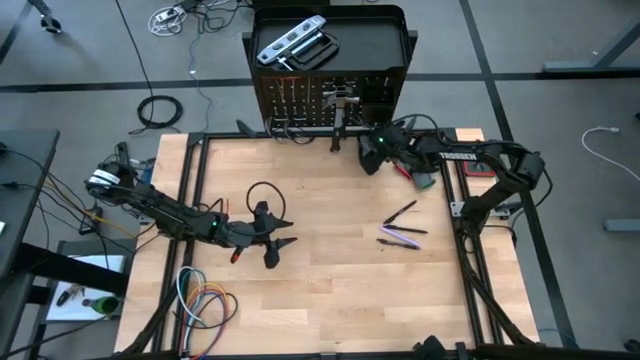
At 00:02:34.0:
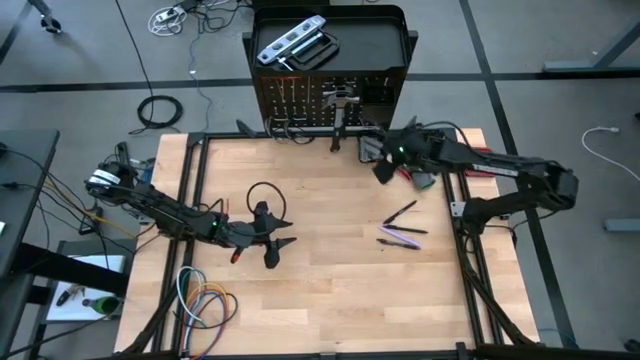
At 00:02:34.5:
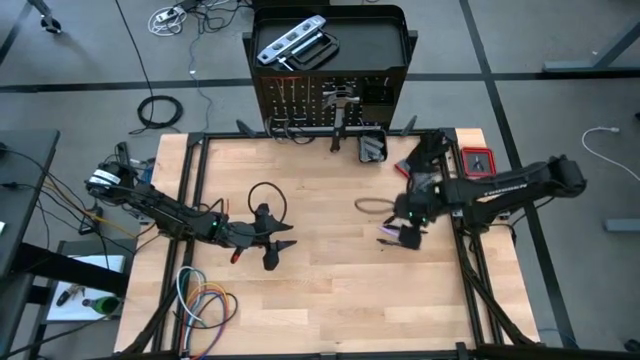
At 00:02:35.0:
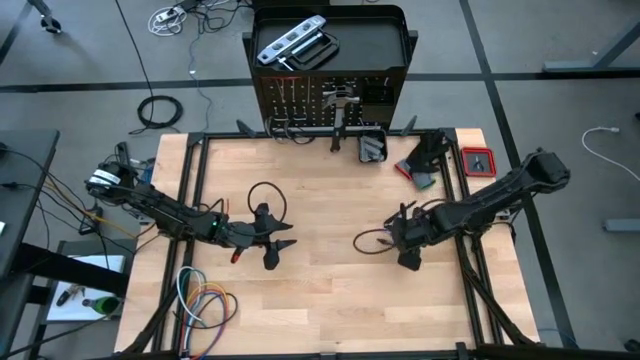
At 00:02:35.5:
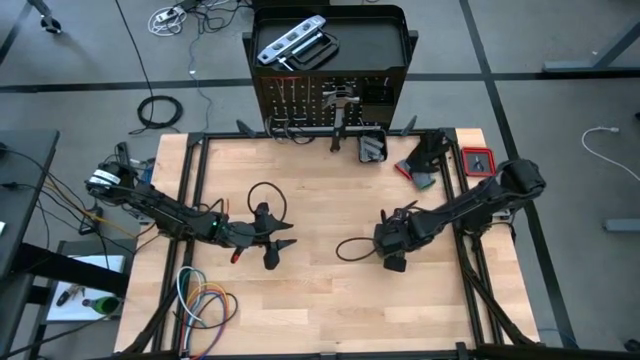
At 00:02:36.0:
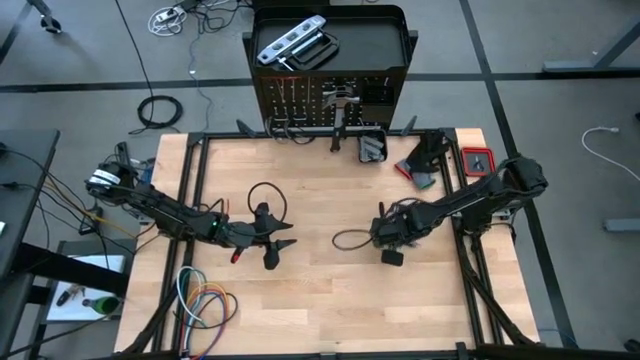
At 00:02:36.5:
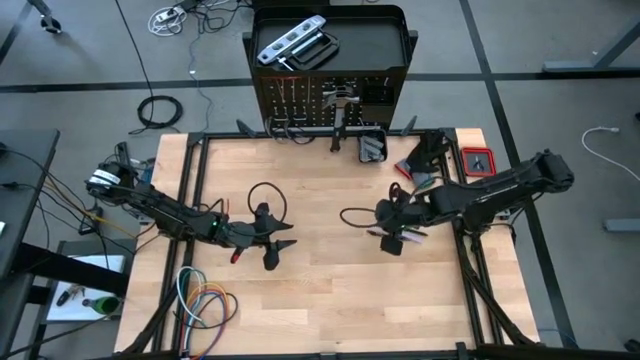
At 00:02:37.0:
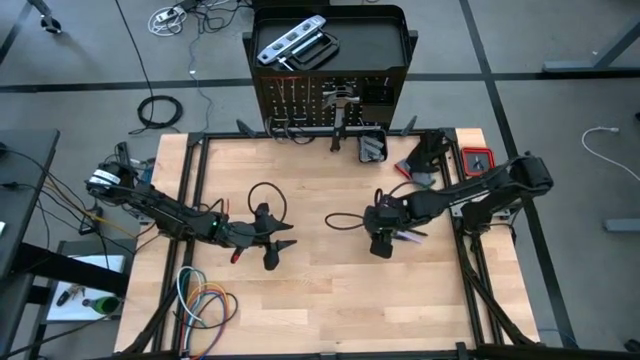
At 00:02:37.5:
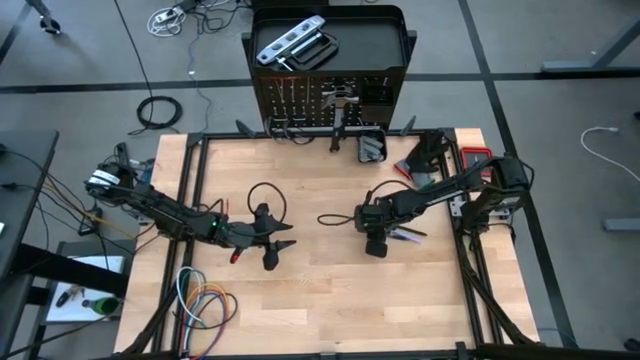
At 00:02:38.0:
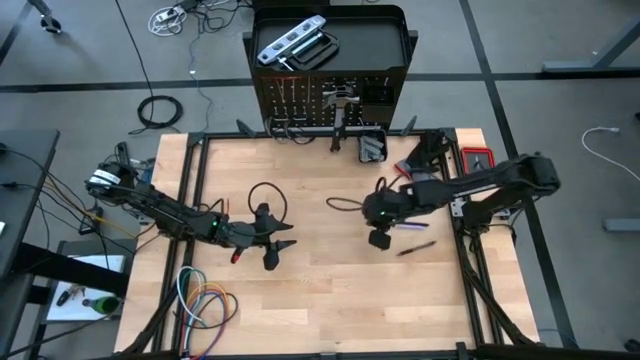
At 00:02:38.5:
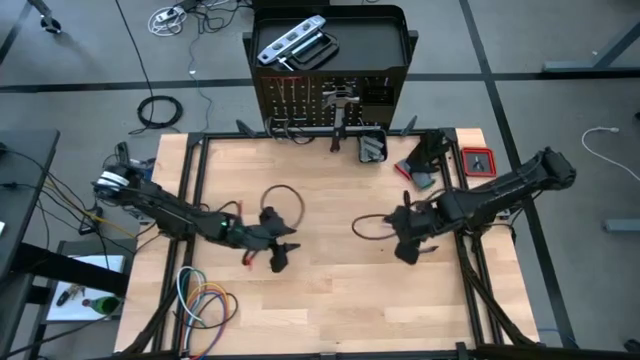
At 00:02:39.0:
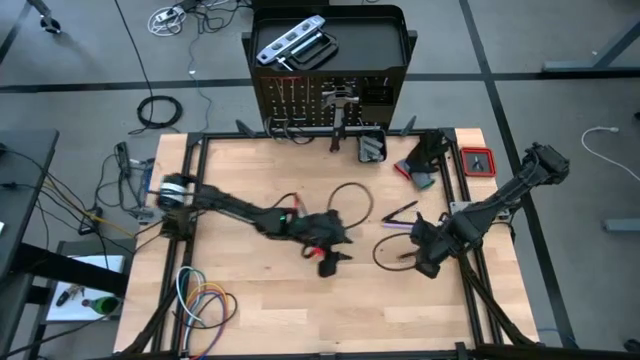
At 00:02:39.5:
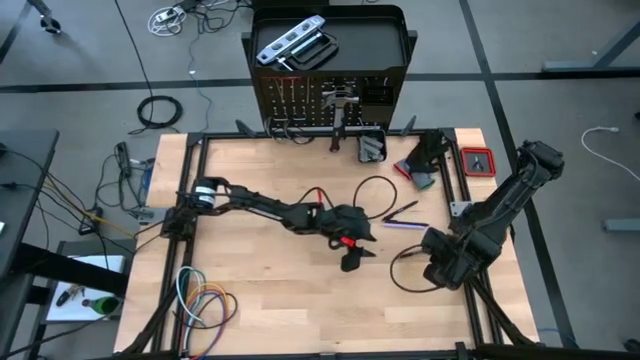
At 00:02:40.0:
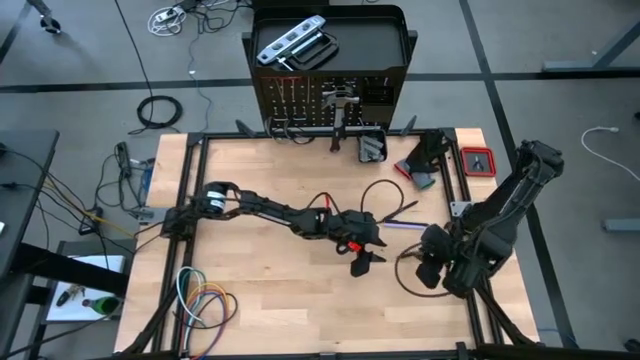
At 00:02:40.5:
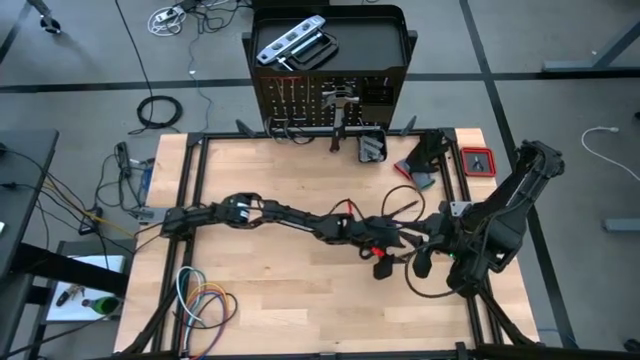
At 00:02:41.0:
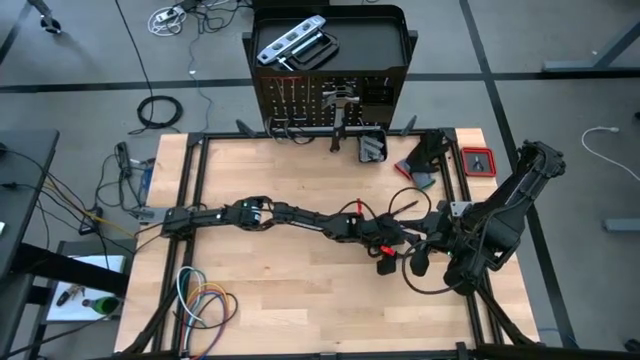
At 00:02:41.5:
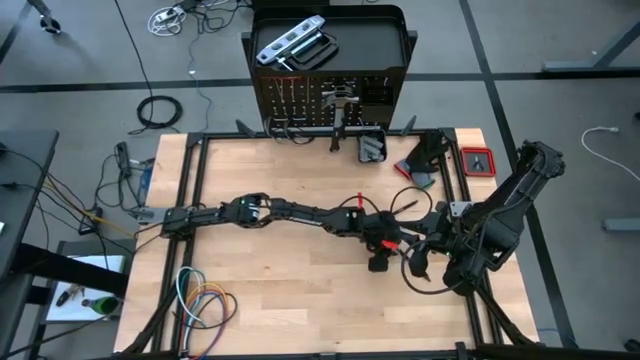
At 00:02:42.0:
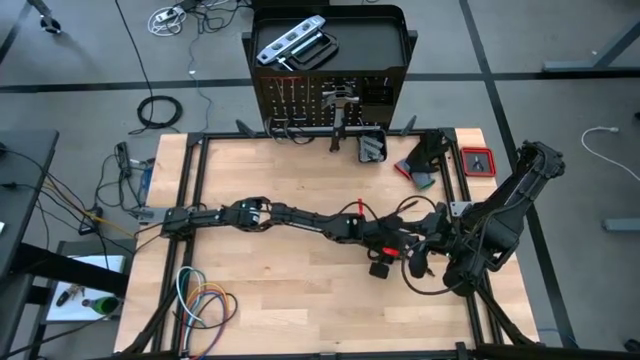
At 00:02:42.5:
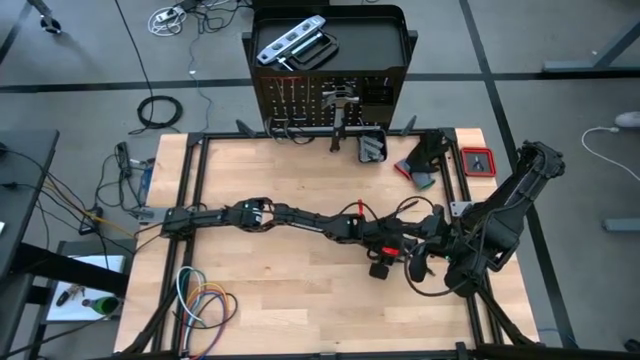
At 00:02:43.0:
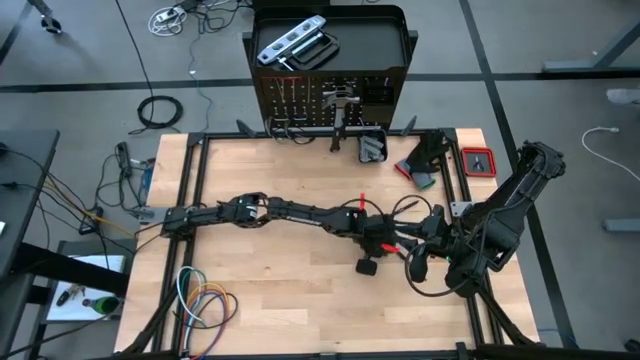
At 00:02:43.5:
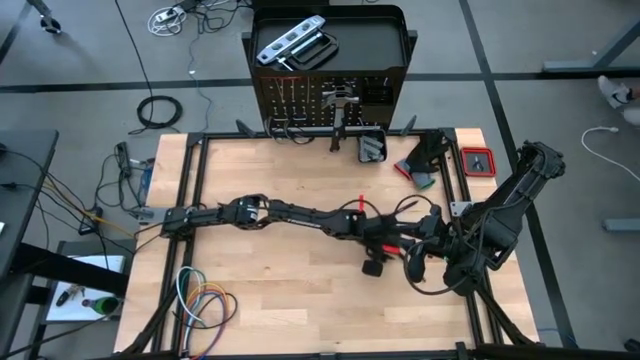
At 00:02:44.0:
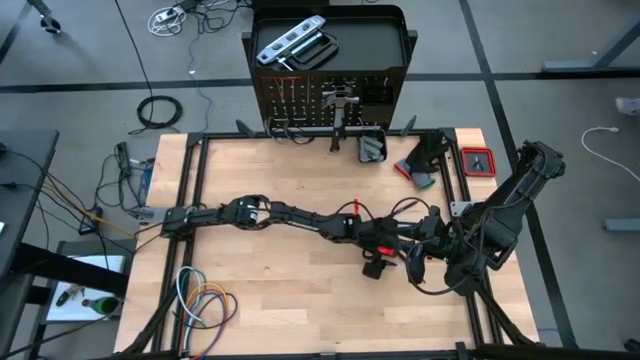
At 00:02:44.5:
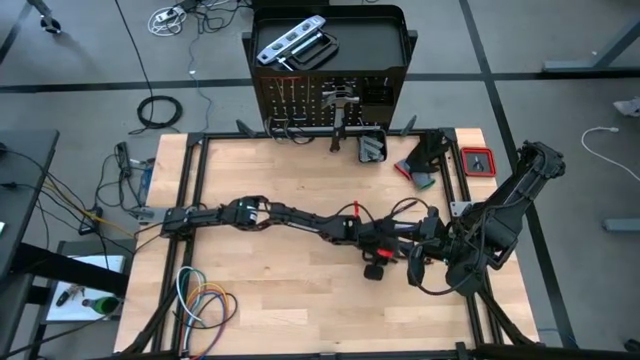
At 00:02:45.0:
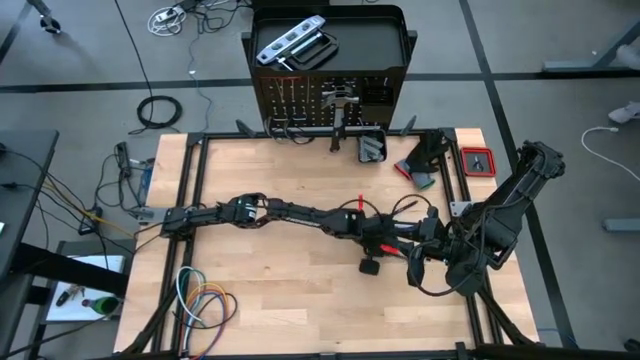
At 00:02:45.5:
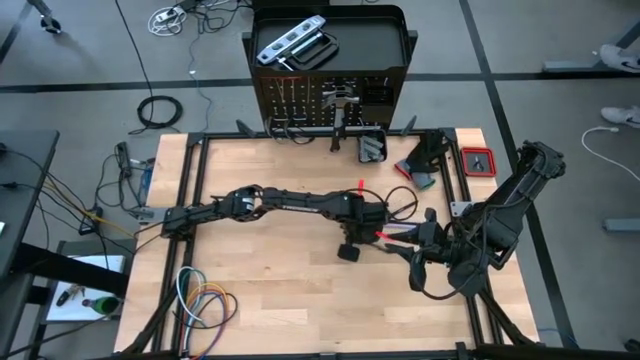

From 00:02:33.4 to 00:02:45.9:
Task: Hang tools onto peg board
Put the black pen into the top basket of the peg board

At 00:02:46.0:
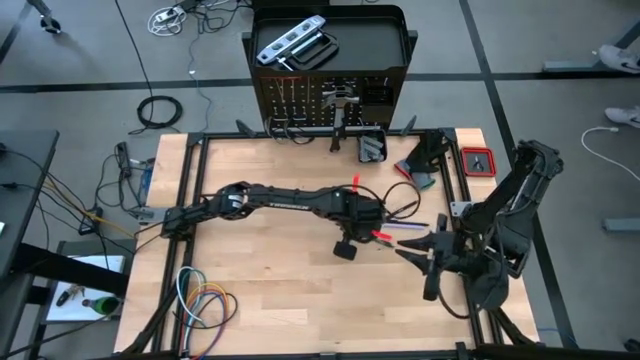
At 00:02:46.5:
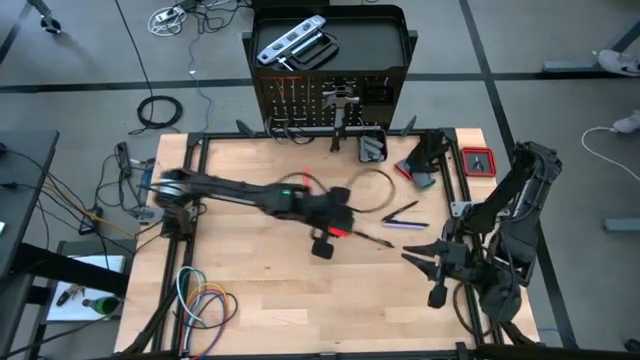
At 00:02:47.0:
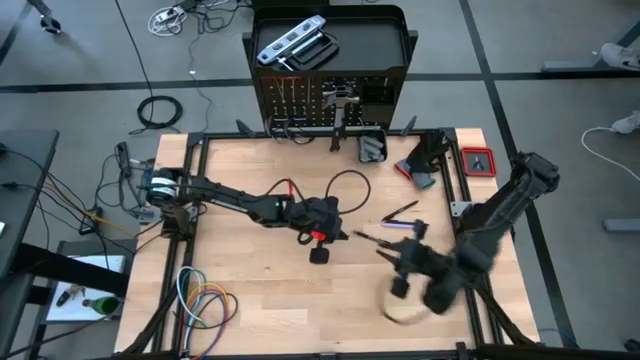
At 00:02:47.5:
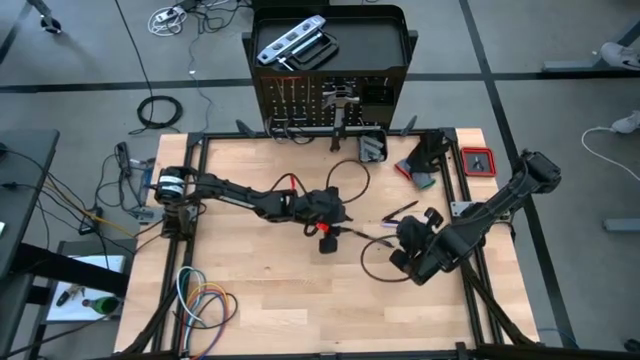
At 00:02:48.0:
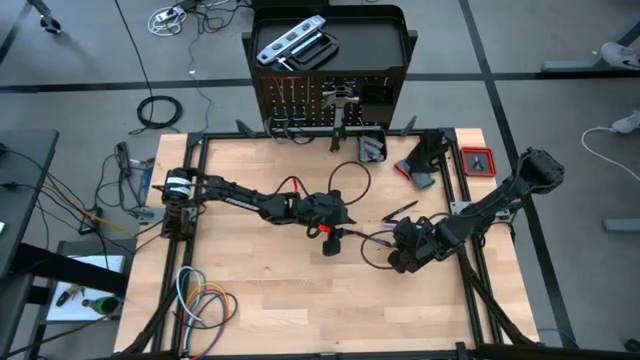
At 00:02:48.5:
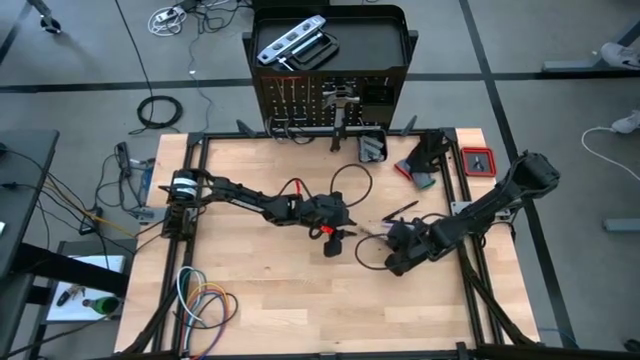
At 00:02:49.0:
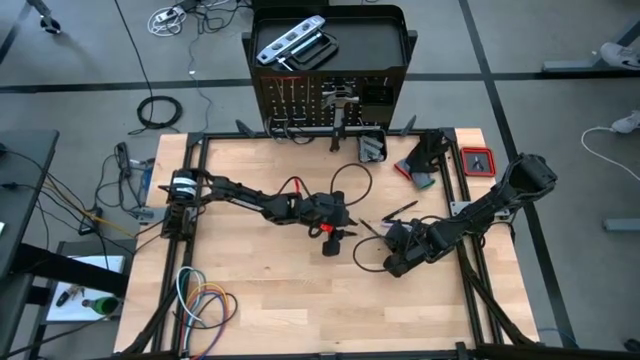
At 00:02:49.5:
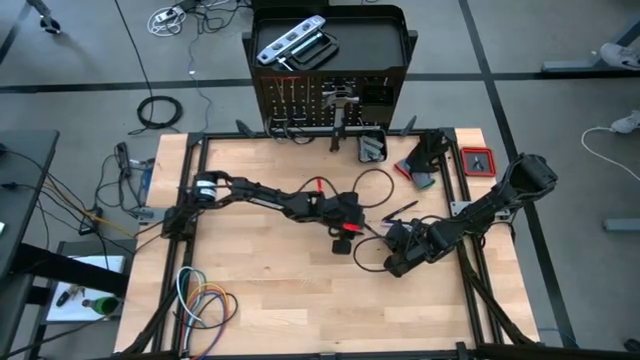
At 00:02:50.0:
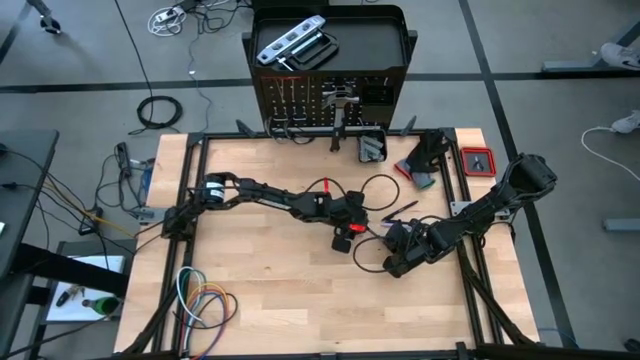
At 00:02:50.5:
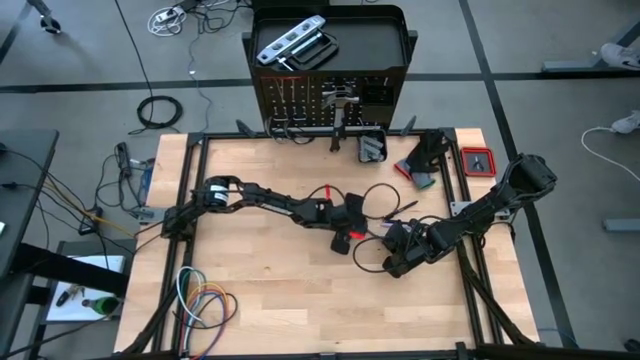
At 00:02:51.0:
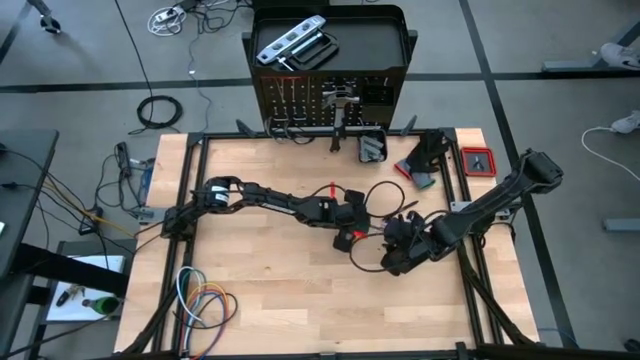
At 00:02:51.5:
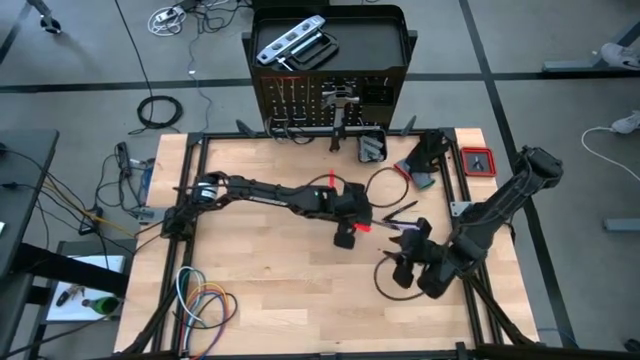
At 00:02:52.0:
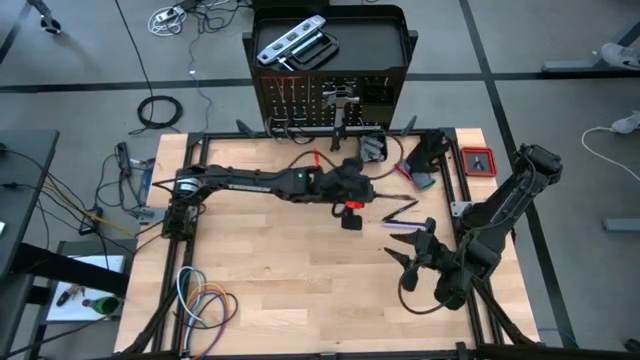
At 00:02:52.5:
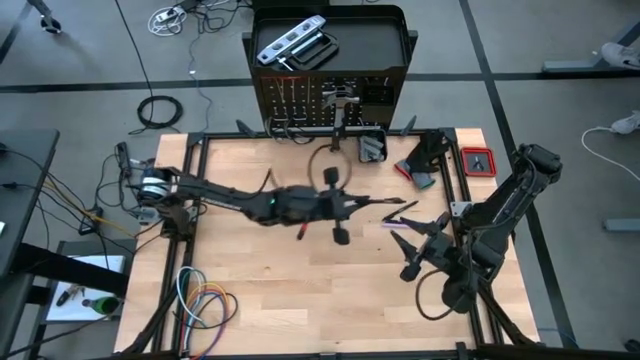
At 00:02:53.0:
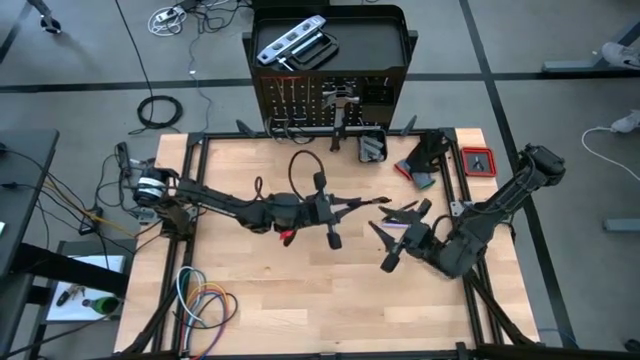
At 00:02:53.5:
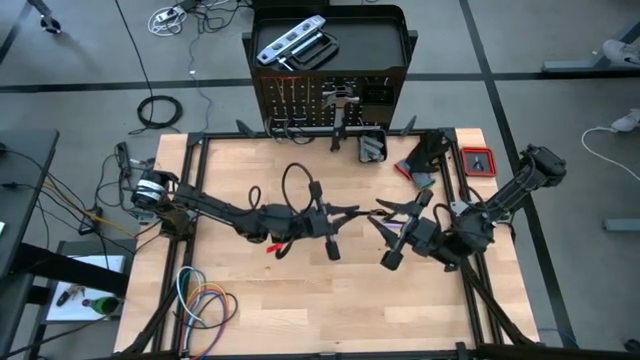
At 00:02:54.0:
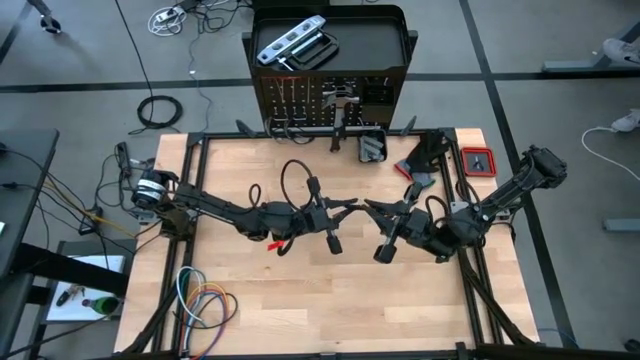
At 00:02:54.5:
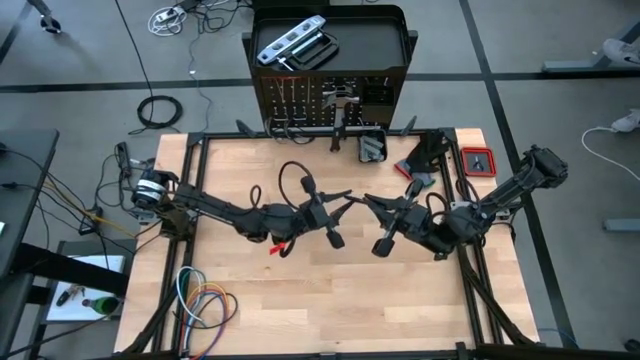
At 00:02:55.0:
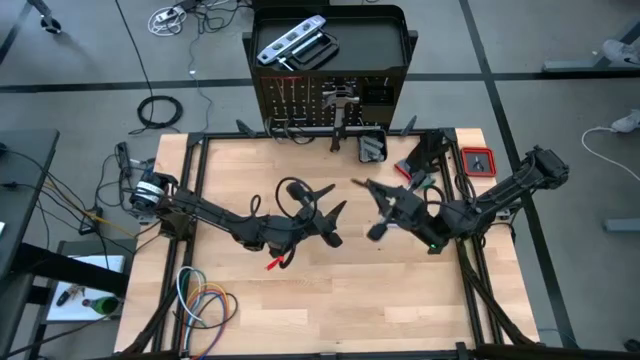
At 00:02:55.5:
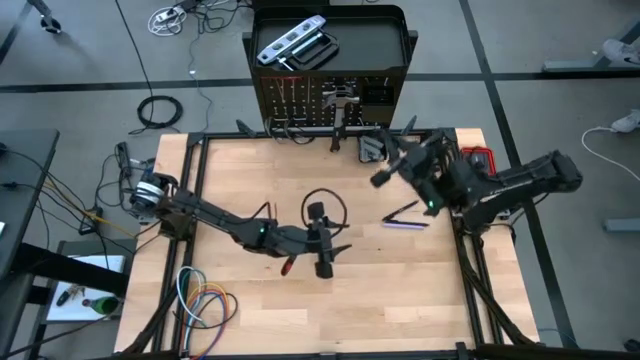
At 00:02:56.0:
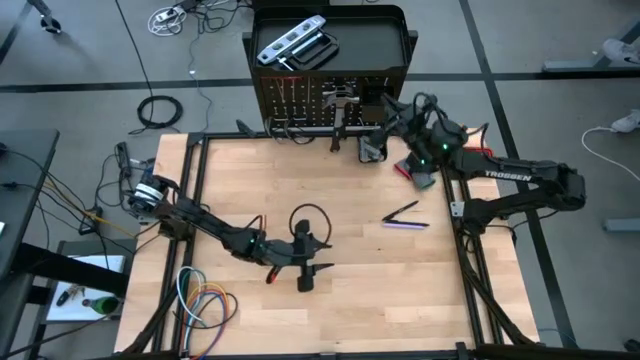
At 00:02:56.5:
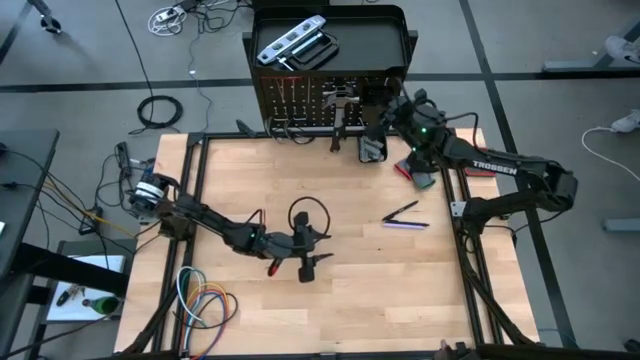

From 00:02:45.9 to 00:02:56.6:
Put the bottom black pen into the top basket of the peg board
